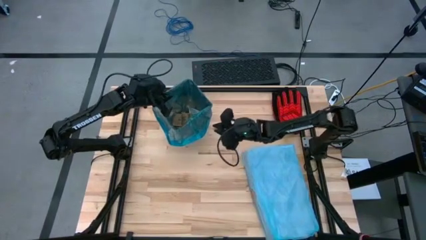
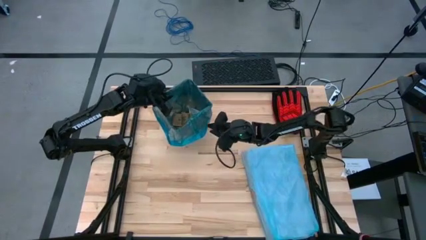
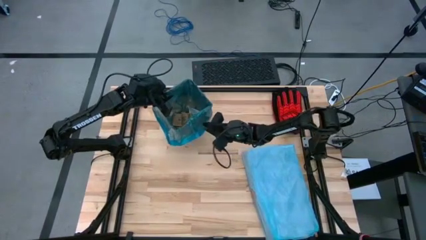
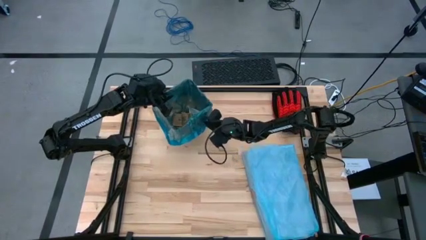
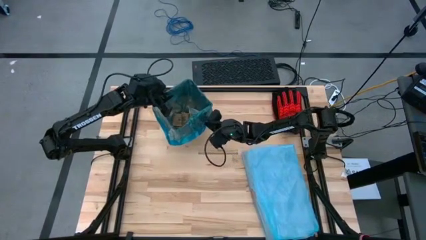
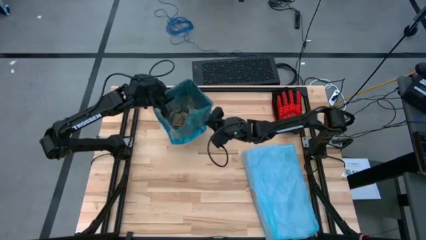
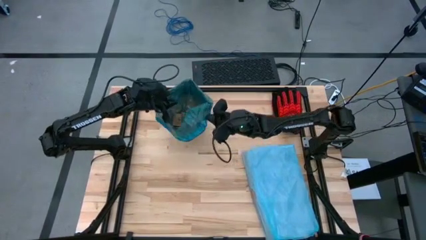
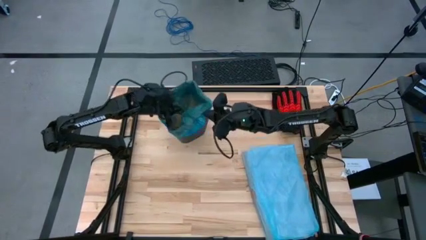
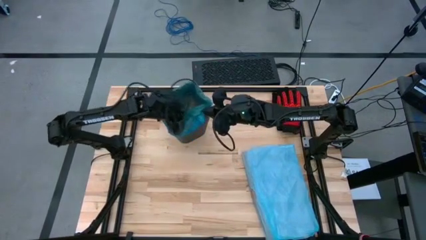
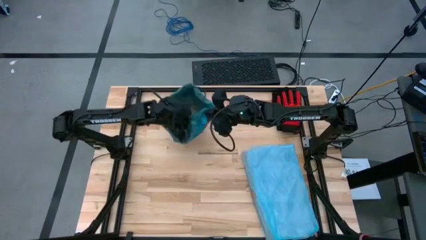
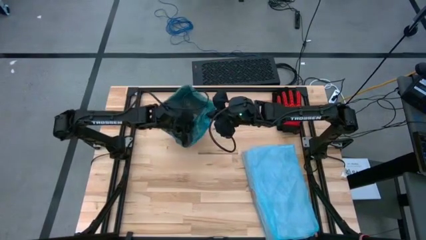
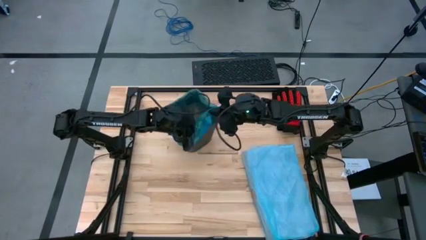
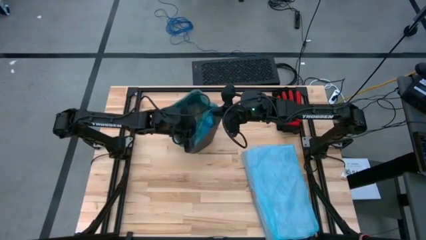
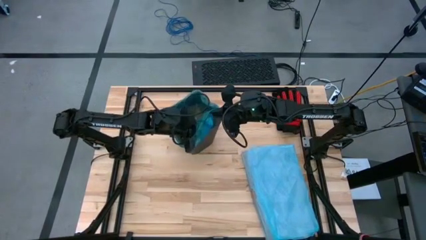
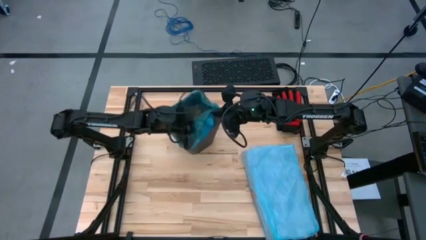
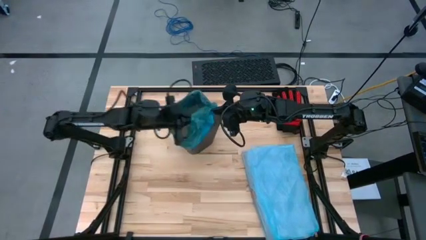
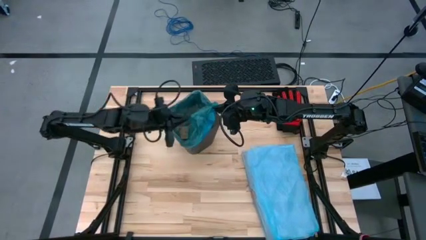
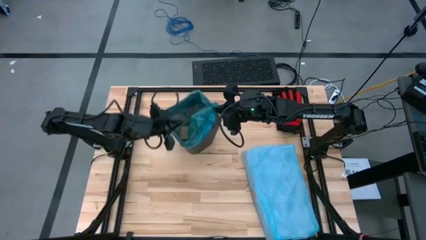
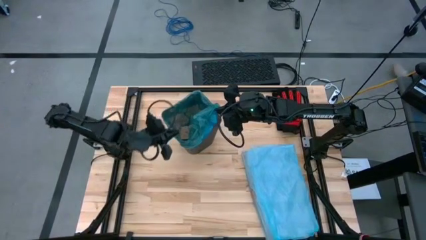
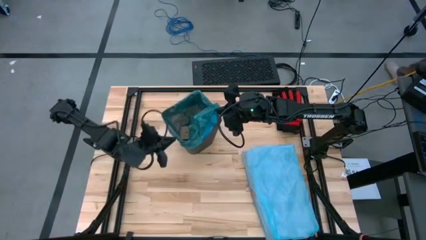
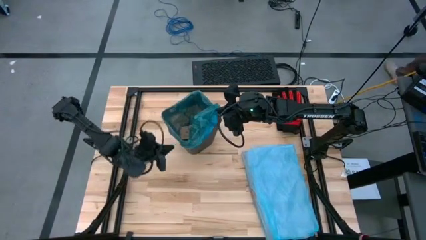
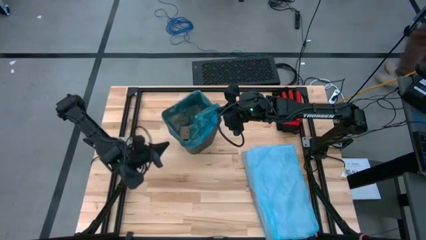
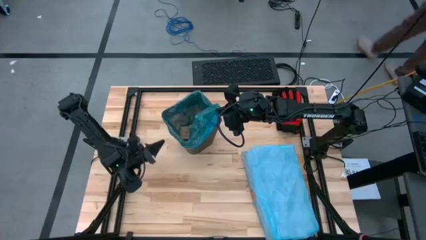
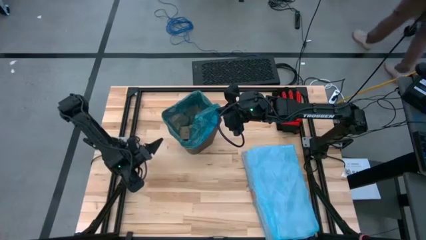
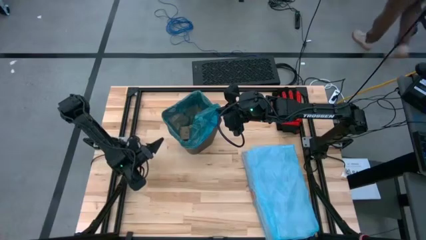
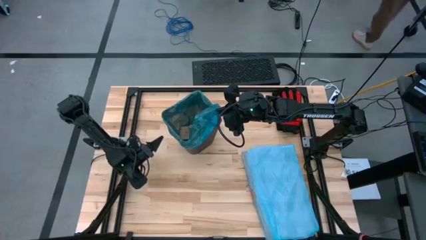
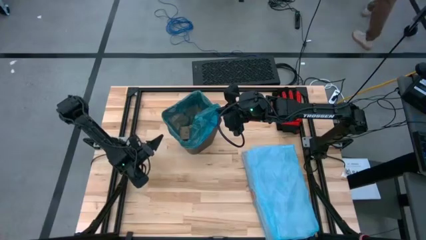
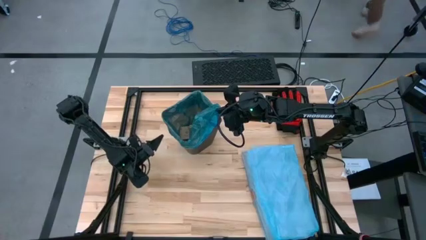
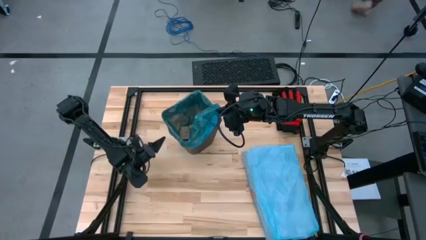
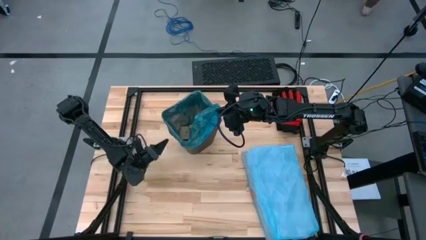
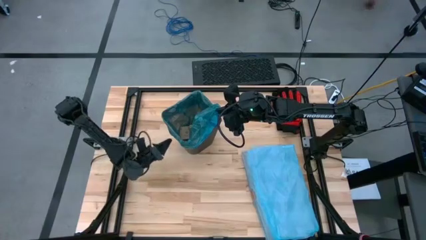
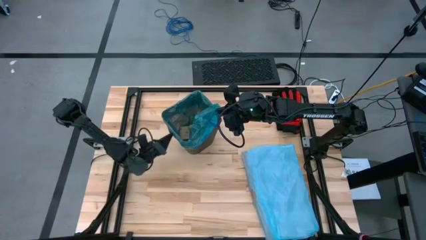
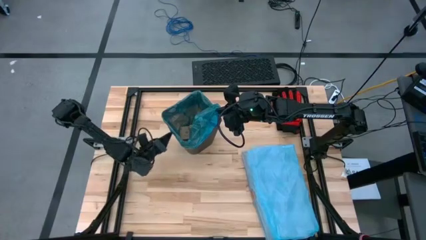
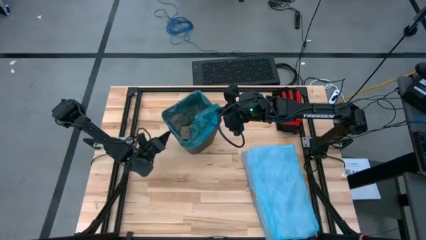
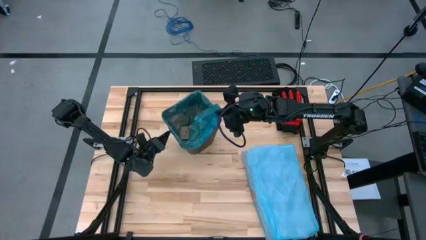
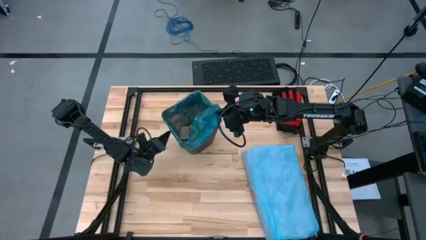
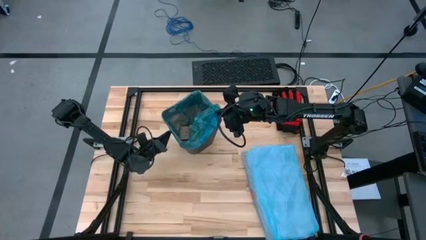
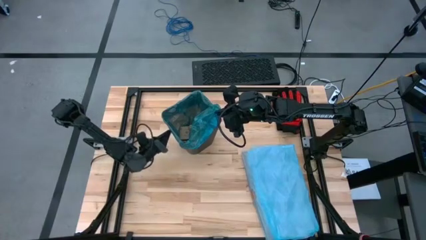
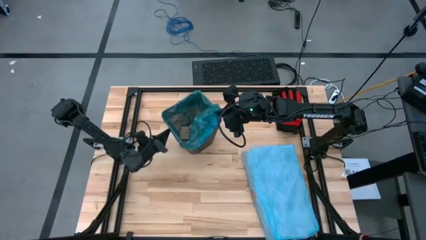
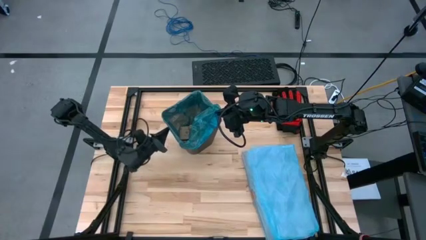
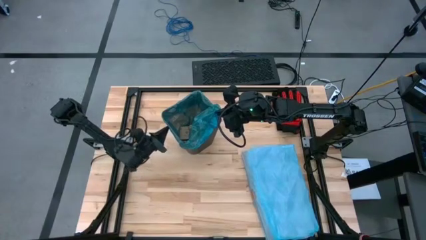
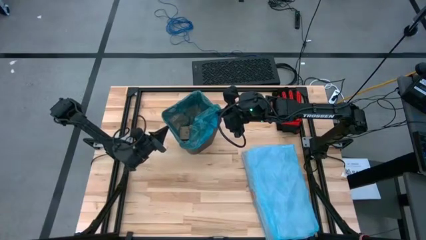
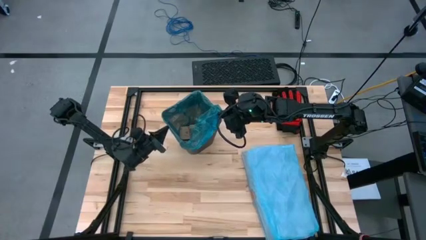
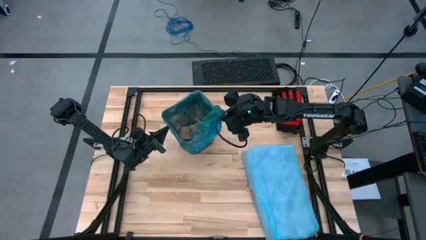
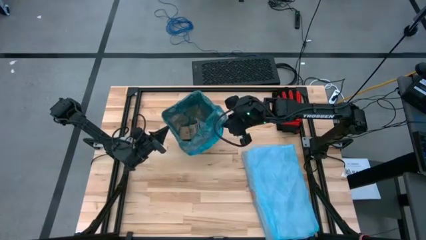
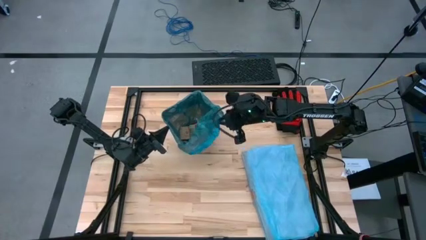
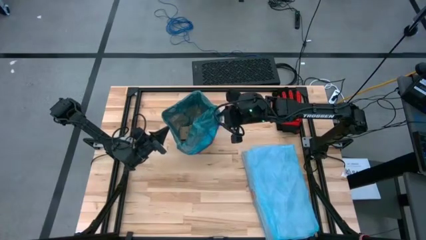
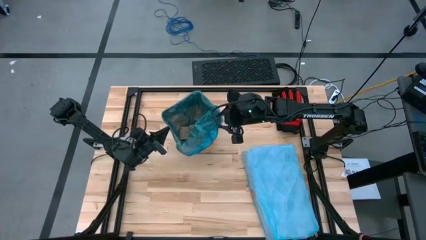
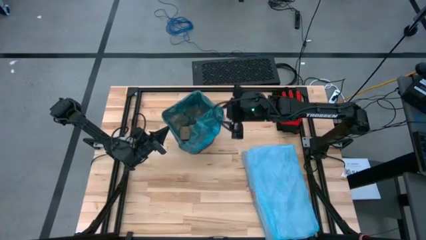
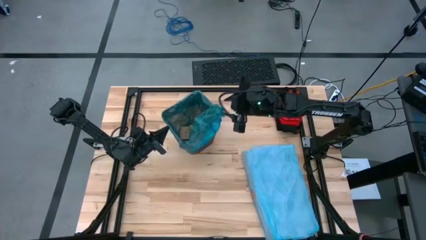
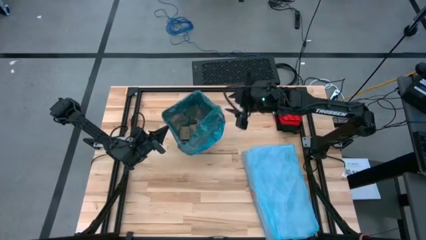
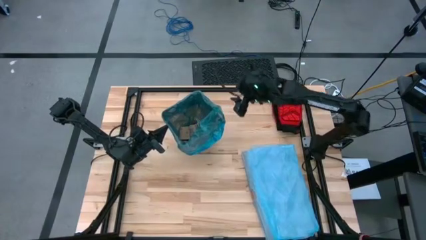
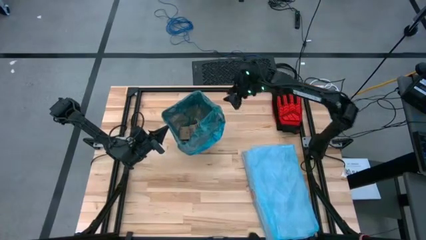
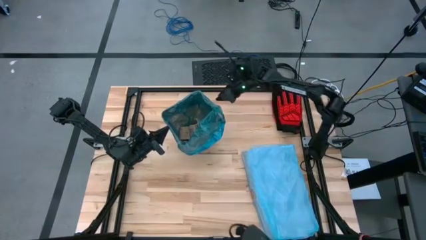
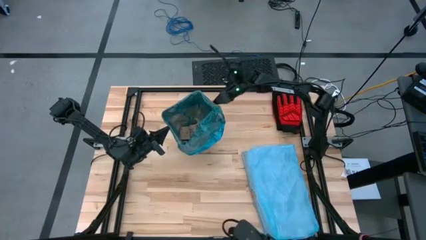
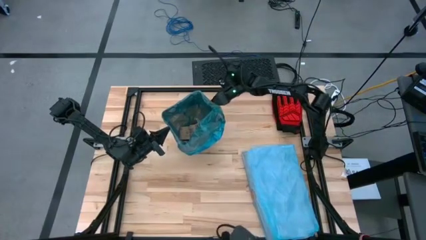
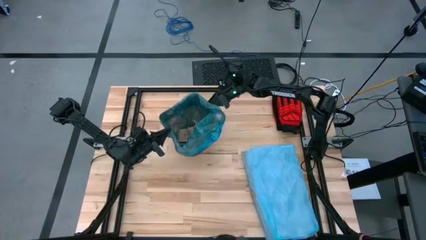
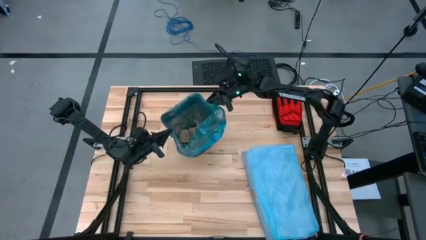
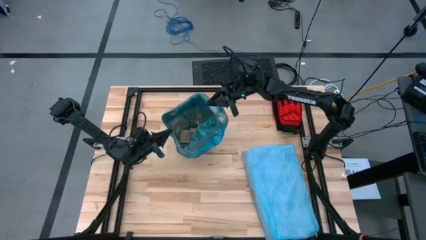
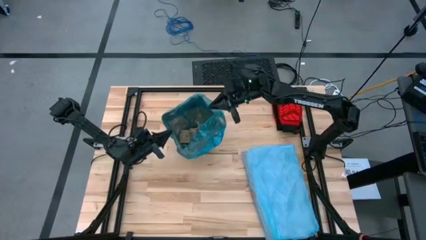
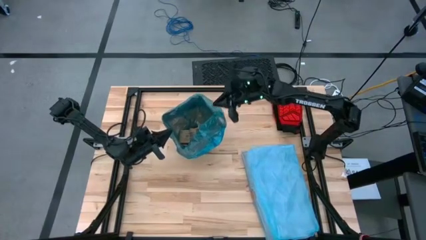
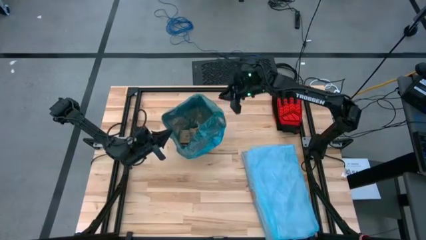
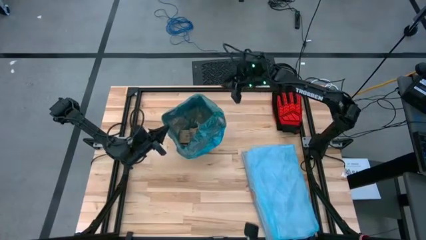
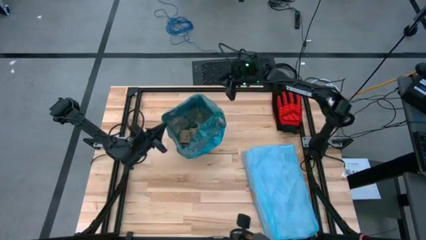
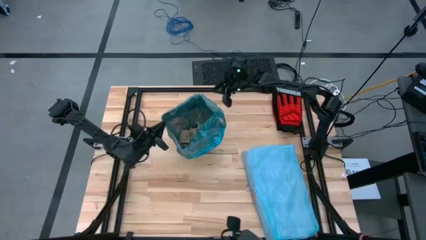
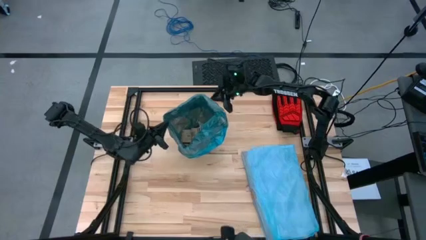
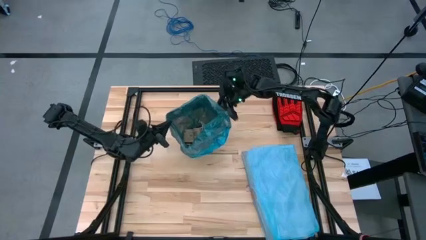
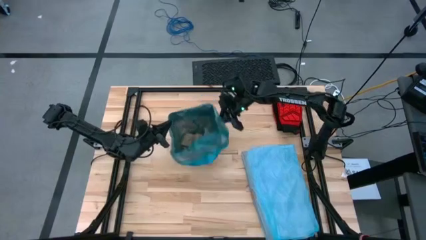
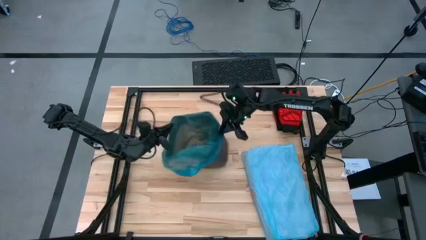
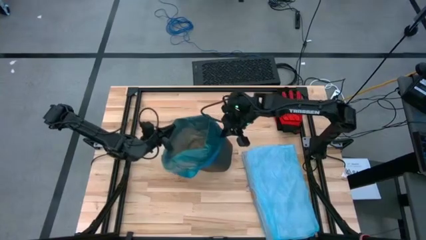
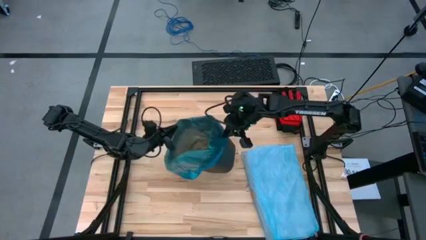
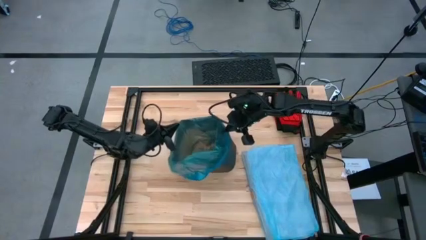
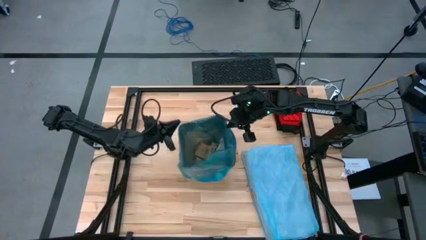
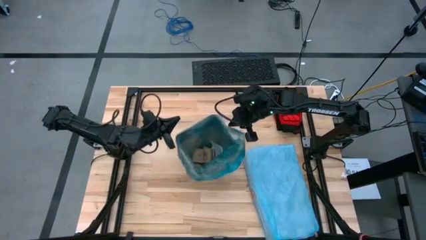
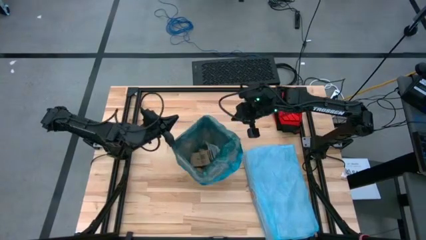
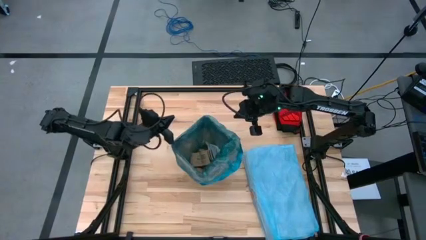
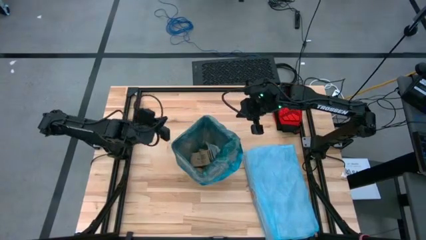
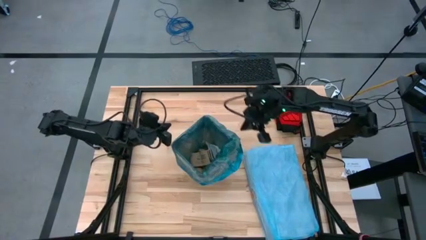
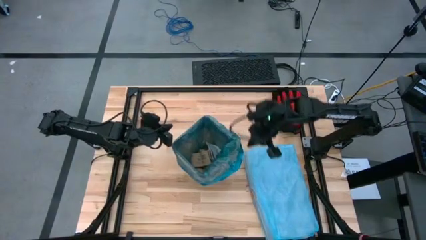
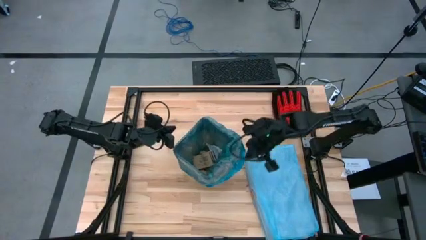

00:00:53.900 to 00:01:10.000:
Task: place trash/remove bag and relplace
Remove the trash bag from the bin
